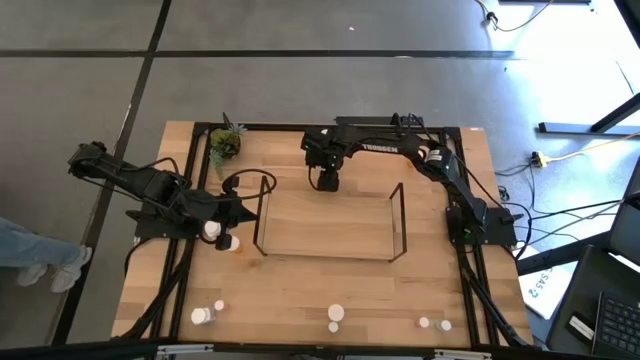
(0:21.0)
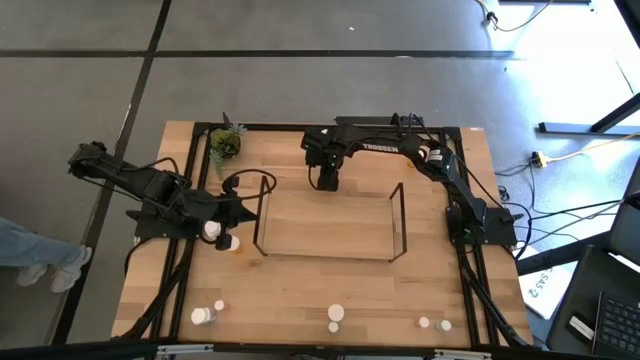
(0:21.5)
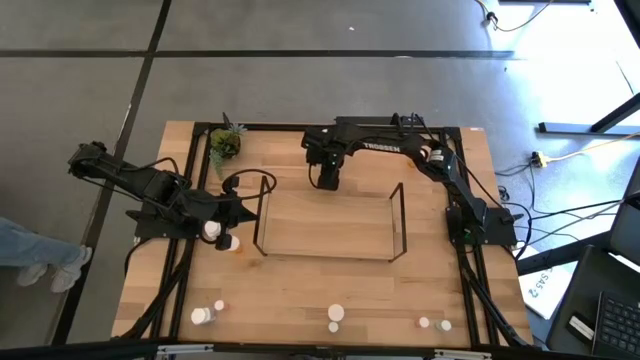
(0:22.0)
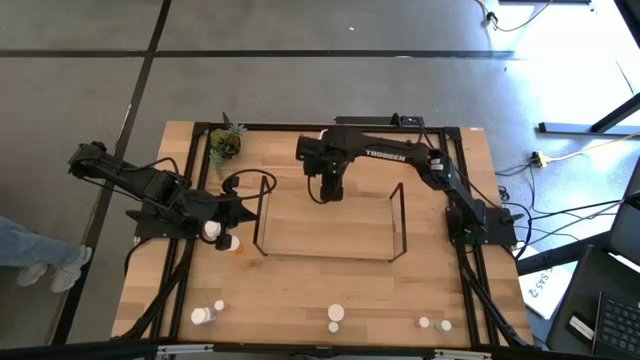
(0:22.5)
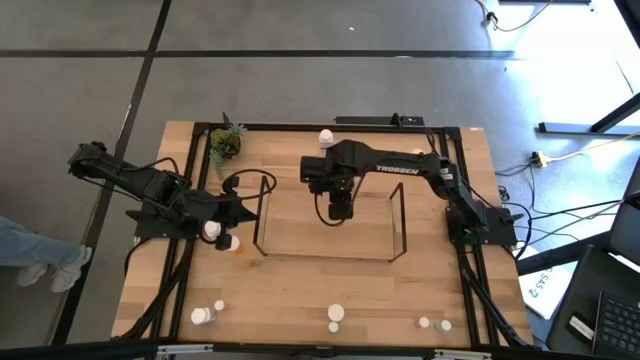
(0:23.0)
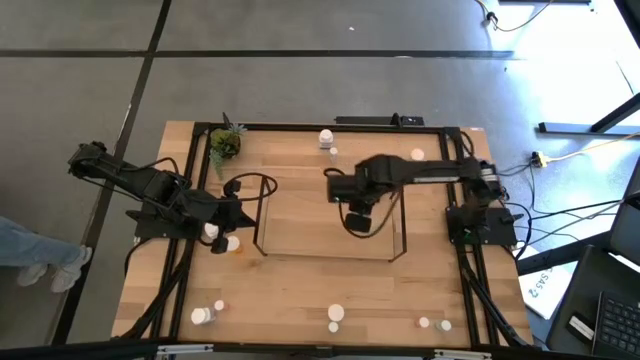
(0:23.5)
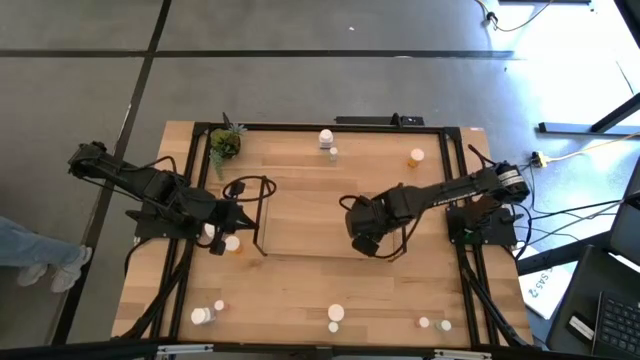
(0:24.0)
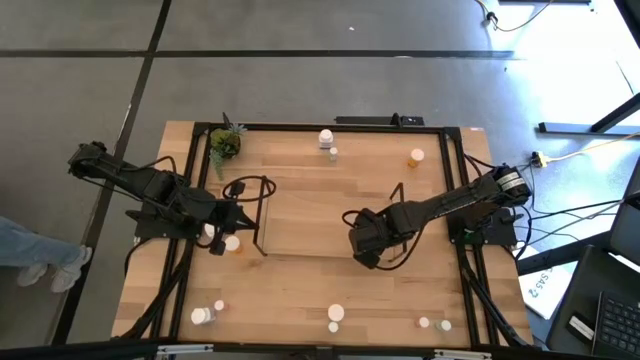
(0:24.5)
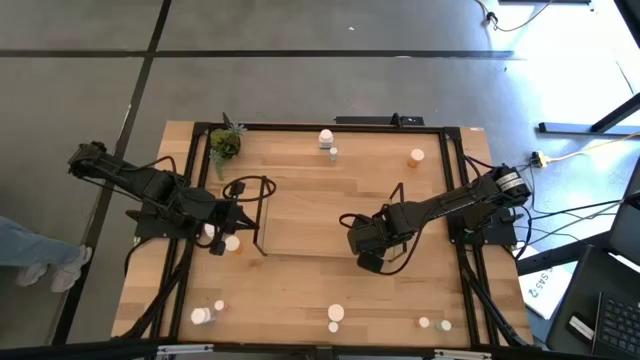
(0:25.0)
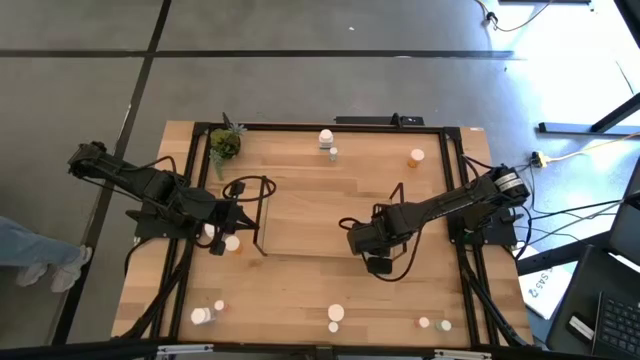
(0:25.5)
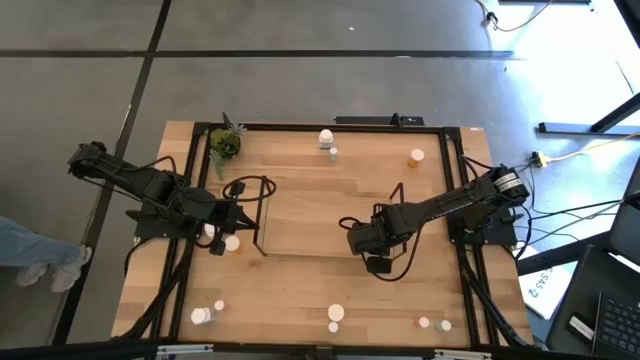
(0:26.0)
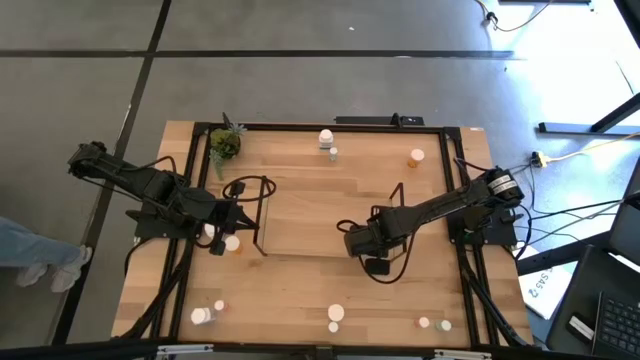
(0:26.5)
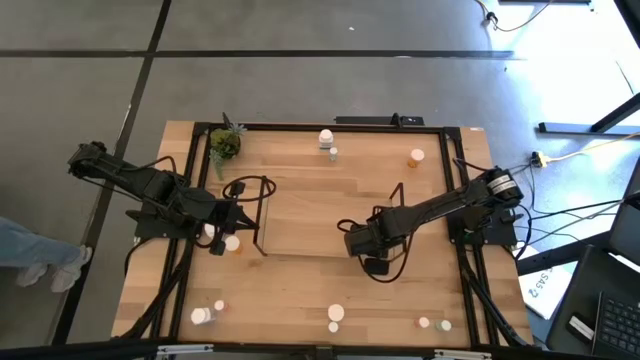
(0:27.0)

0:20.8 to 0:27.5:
Task: Pick and place medicine bottles onto shelf by color
Move the middle right pill bottle on the shelf

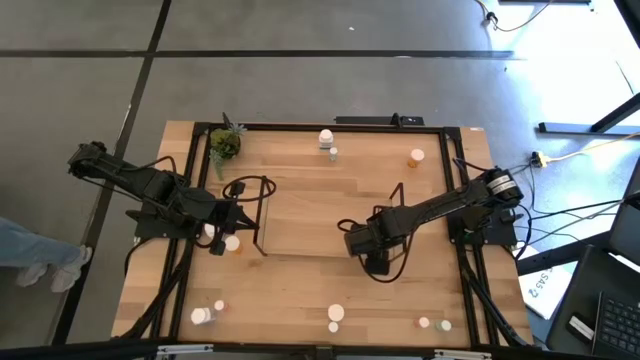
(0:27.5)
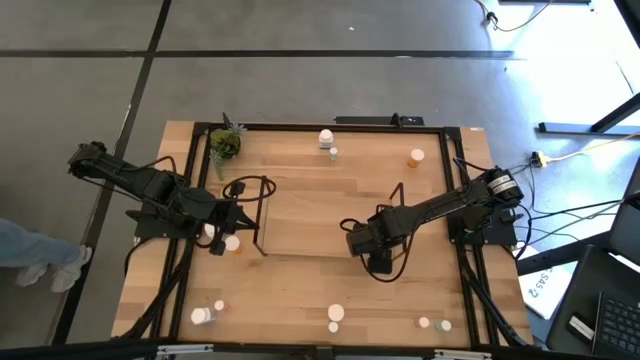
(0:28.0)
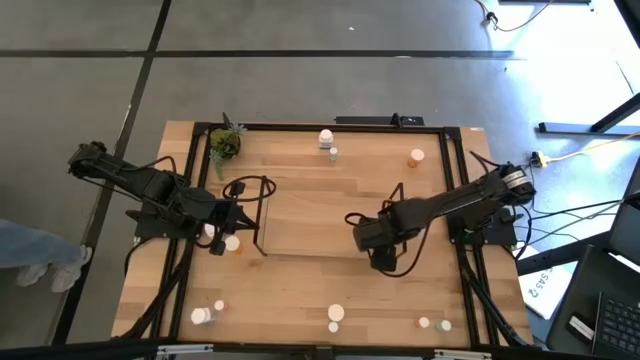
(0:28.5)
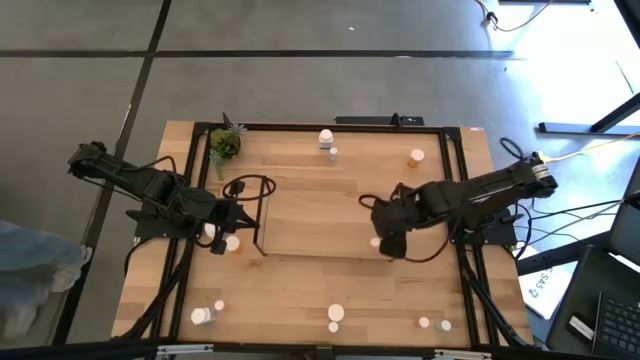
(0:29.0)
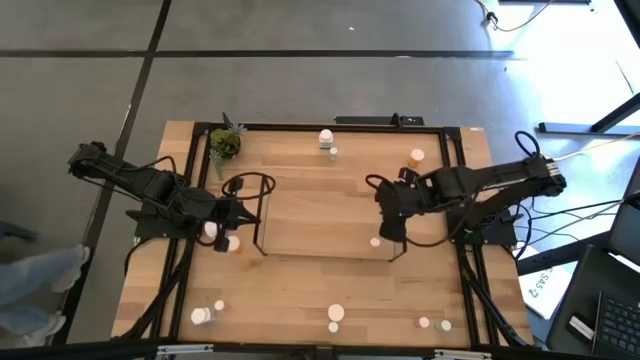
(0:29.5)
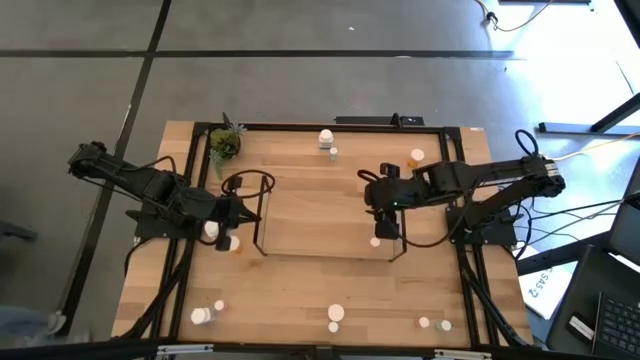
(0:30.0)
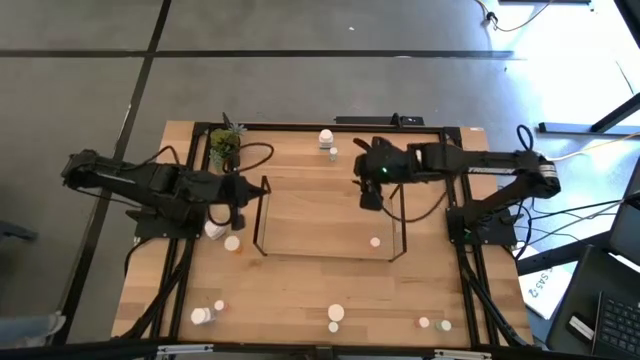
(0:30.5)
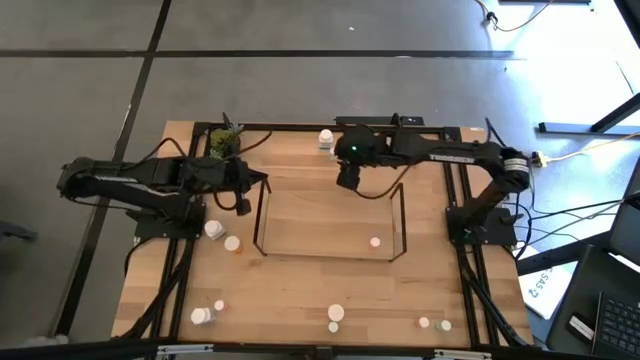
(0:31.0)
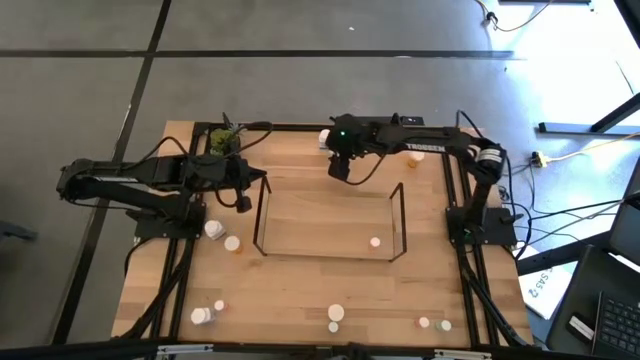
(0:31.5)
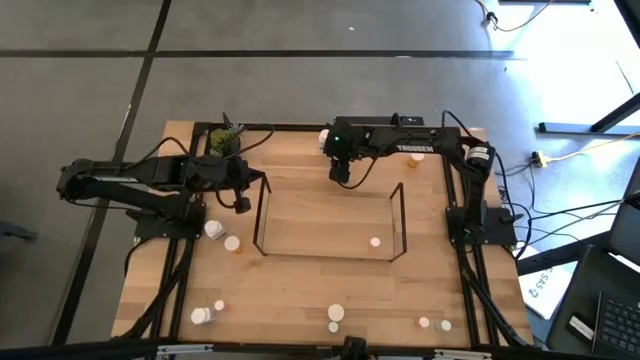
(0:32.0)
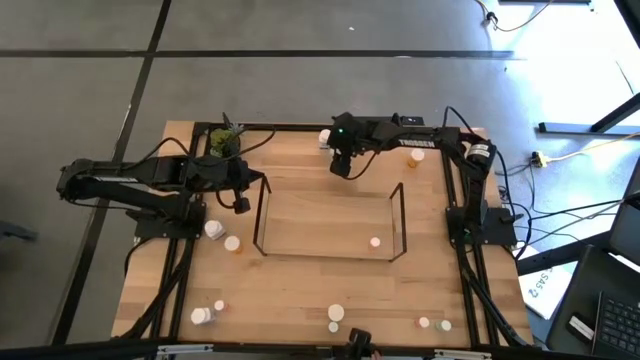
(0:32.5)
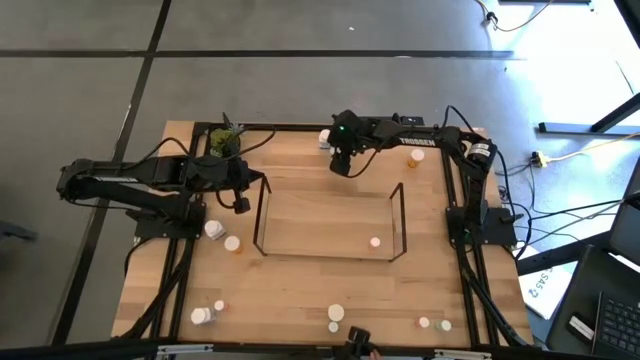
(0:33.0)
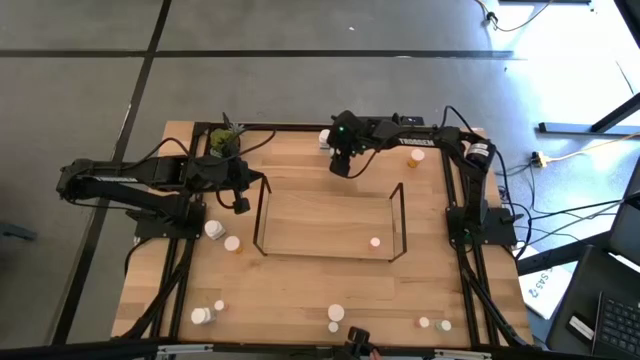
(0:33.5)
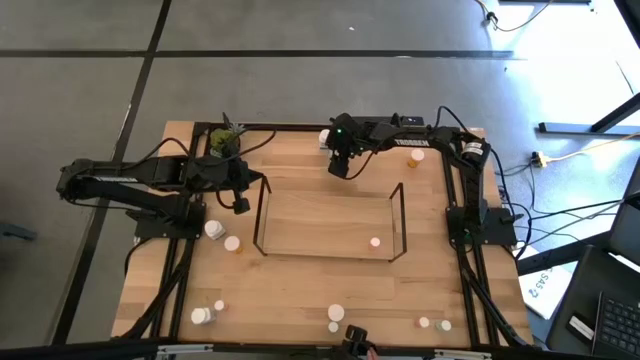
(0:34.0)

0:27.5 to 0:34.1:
Put the top light blue pill bottle on the shelf

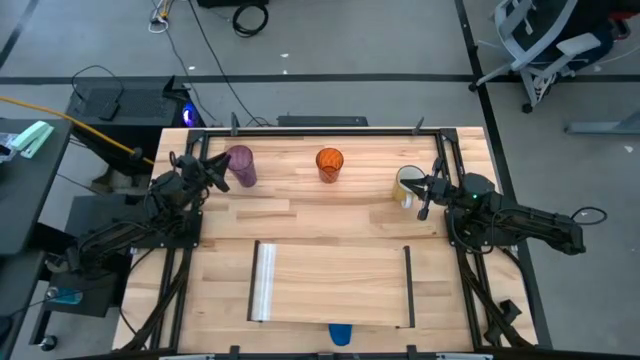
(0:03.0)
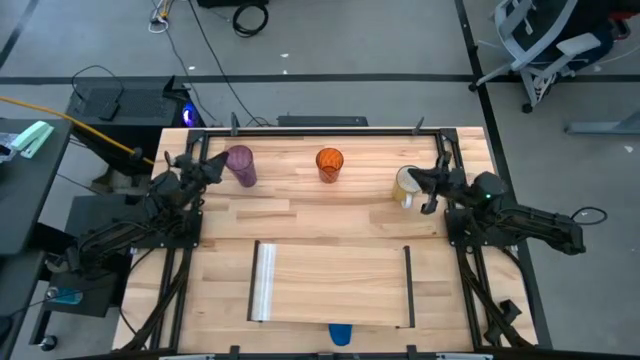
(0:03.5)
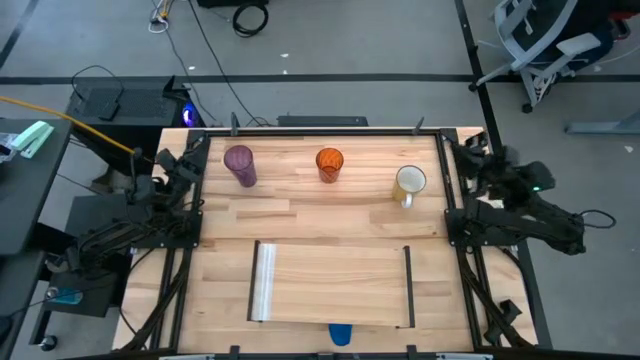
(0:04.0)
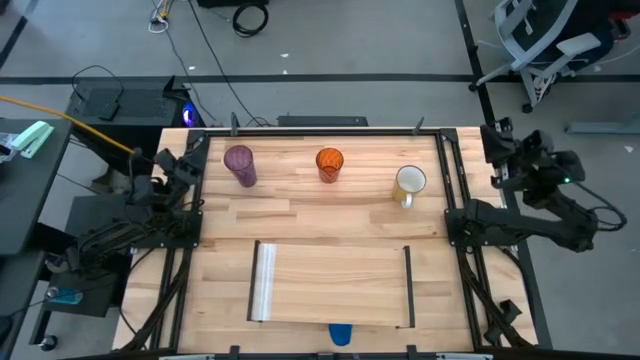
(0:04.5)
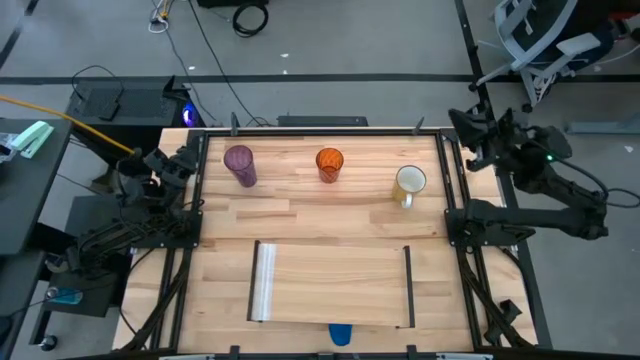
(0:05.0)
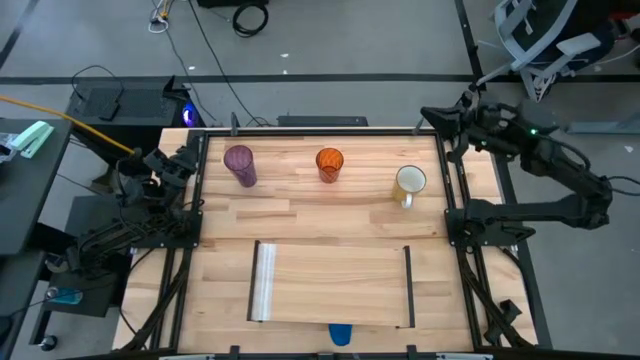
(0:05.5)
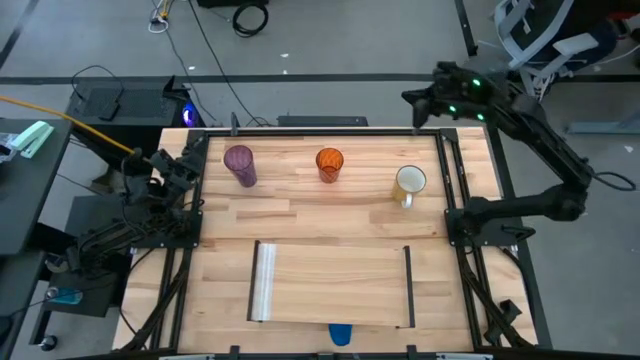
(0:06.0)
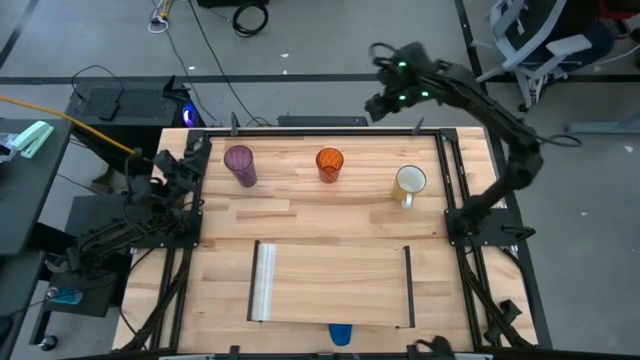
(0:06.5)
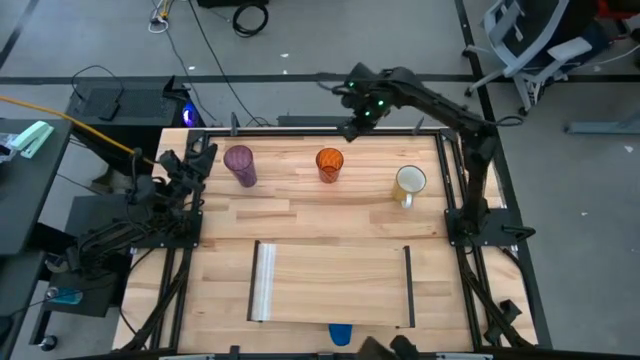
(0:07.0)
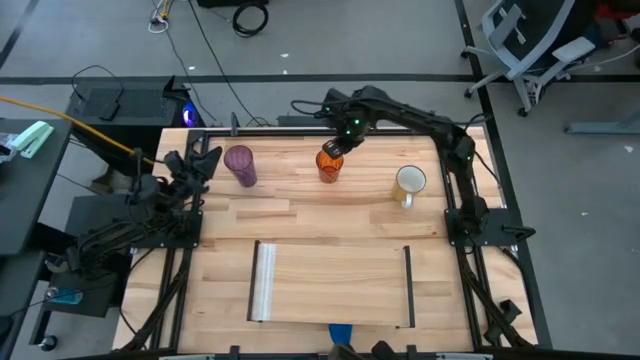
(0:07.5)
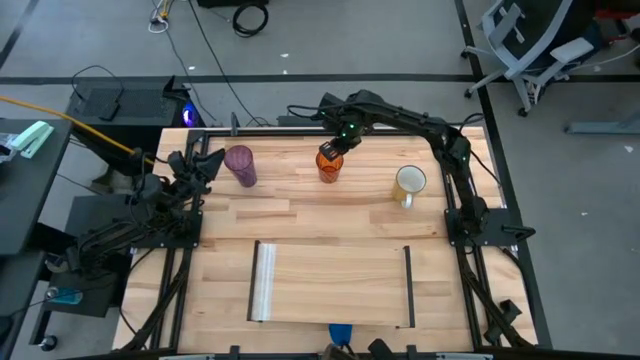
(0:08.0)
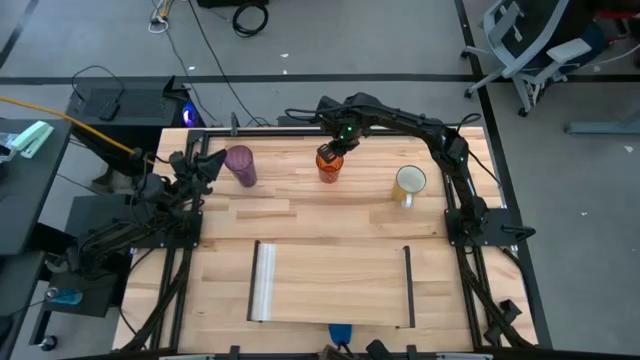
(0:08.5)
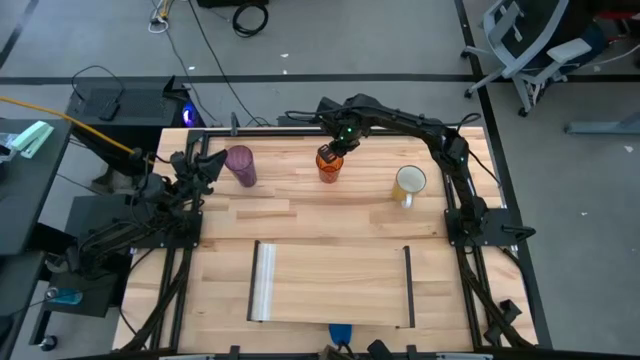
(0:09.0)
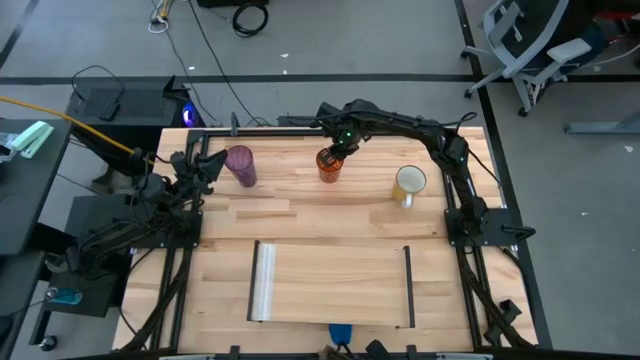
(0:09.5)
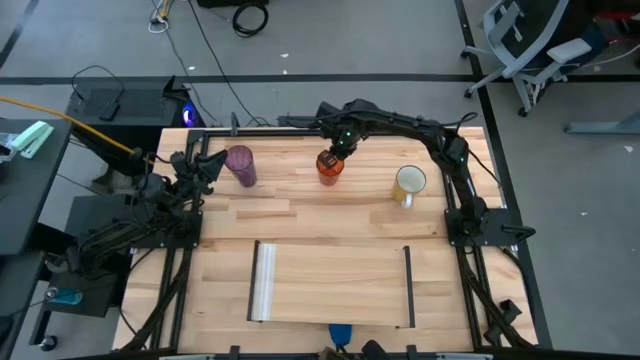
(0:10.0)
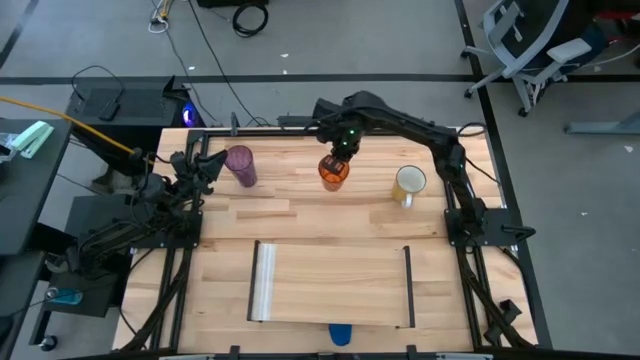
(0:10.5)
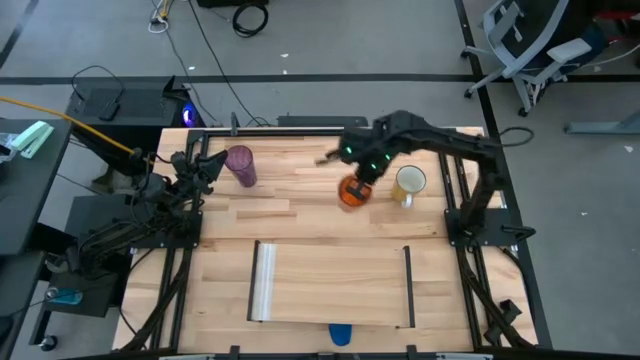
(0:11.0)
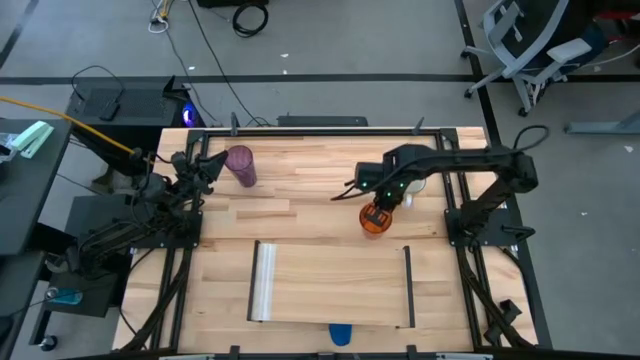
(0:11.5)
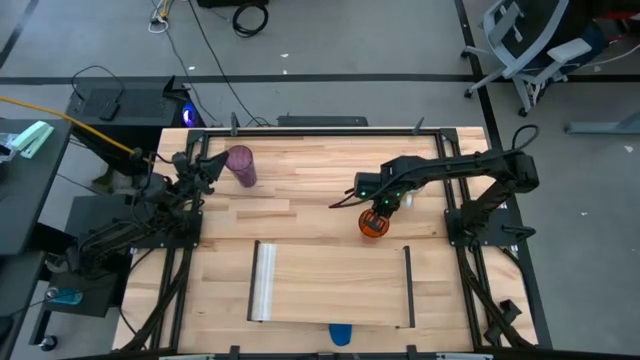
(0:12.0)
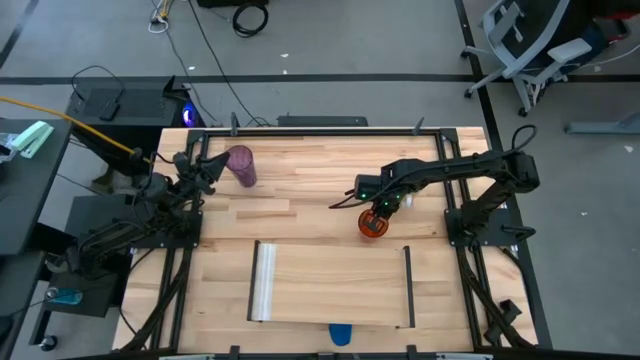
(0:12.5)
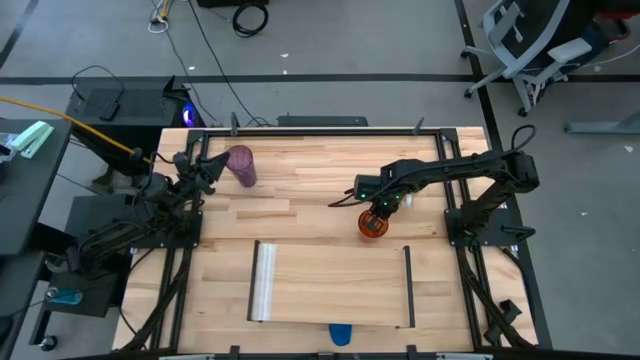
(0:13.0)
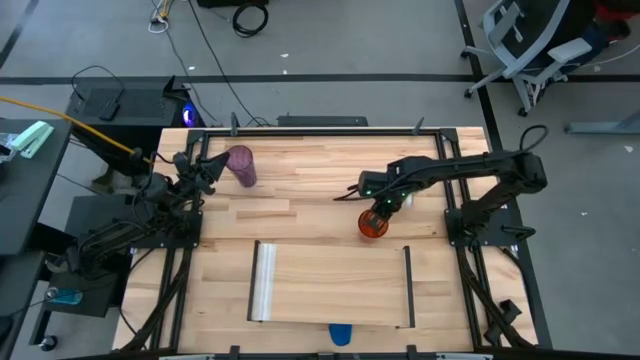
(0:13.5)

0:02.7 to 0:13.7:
Task: Stack small to large cups/mugs on shelf
Move the orange cup to the middle right of the table
